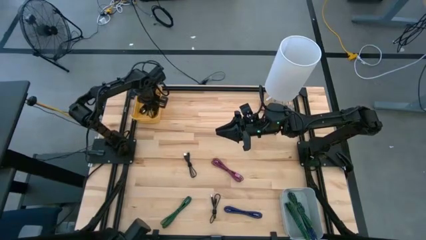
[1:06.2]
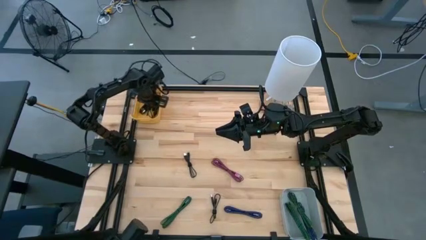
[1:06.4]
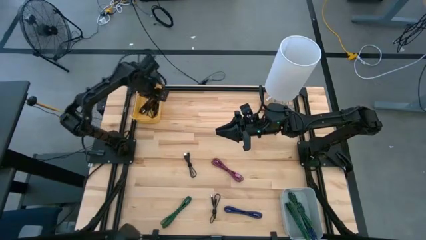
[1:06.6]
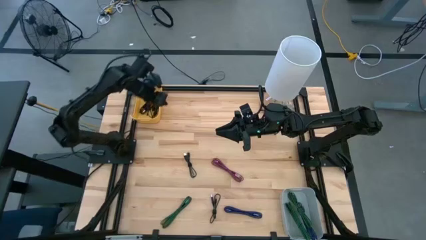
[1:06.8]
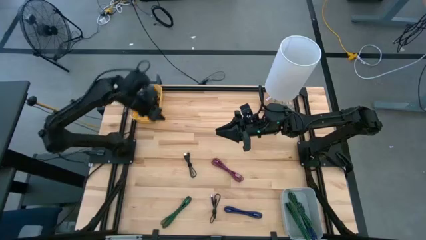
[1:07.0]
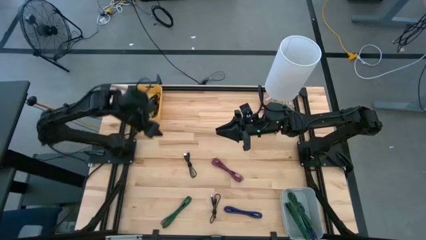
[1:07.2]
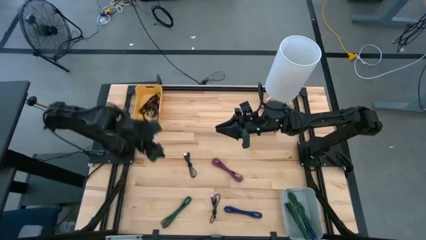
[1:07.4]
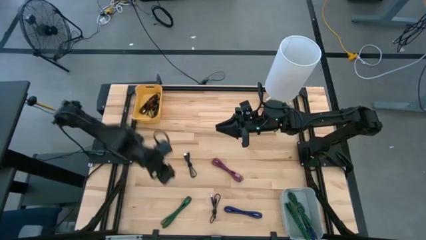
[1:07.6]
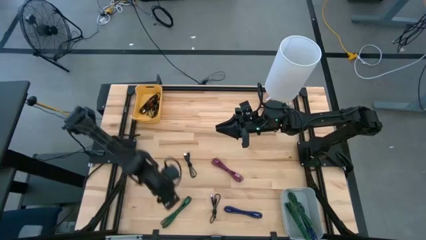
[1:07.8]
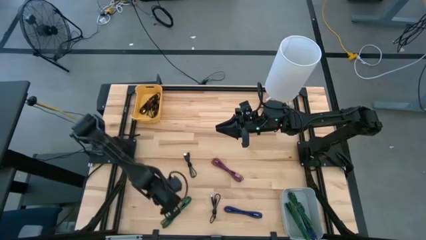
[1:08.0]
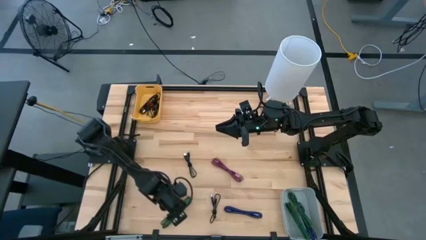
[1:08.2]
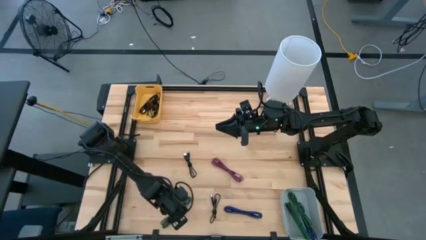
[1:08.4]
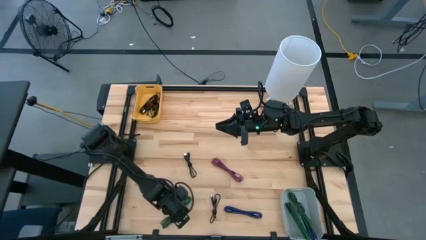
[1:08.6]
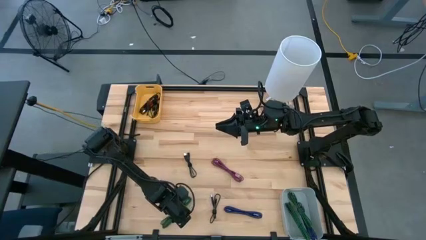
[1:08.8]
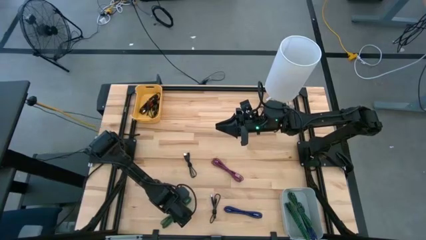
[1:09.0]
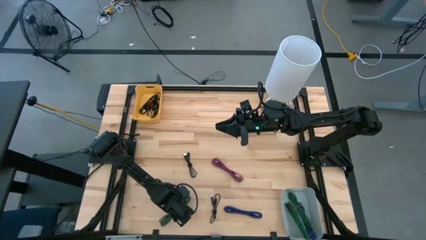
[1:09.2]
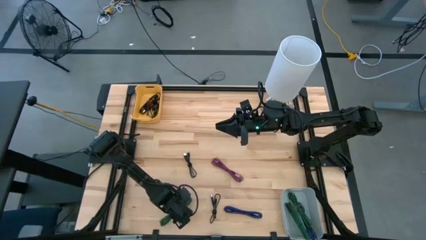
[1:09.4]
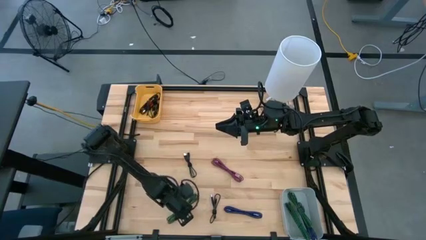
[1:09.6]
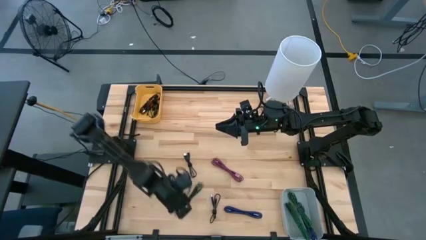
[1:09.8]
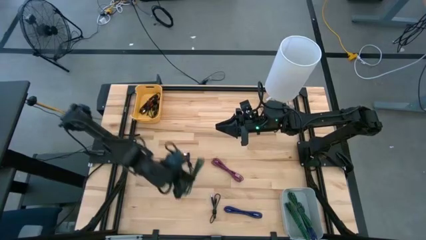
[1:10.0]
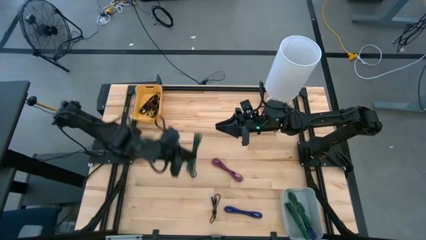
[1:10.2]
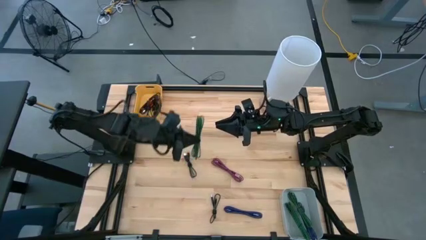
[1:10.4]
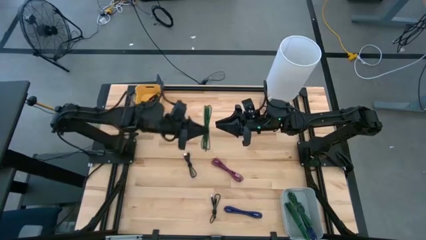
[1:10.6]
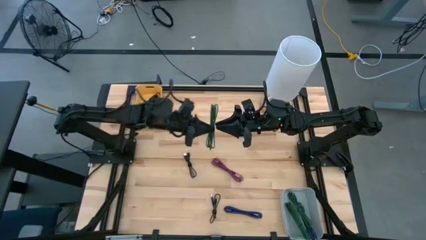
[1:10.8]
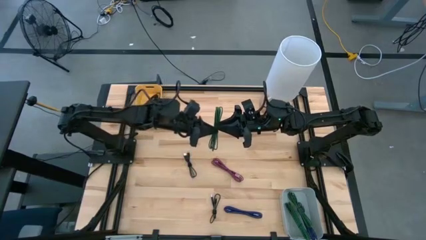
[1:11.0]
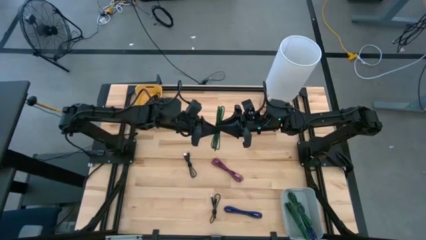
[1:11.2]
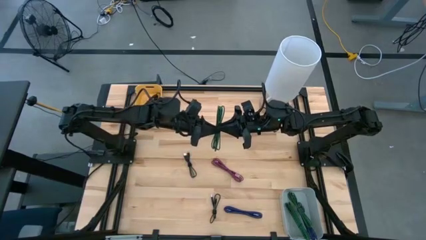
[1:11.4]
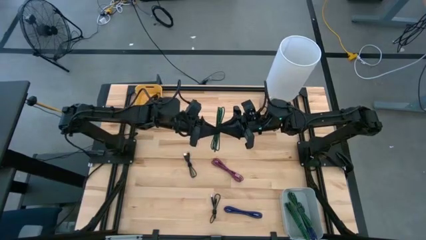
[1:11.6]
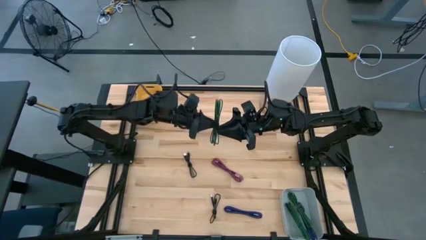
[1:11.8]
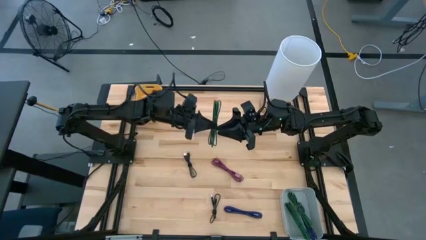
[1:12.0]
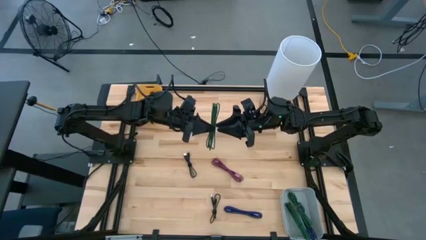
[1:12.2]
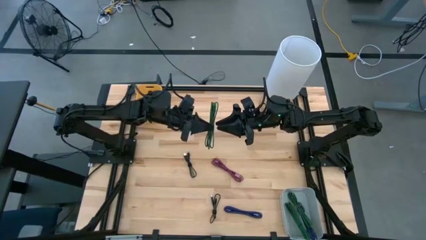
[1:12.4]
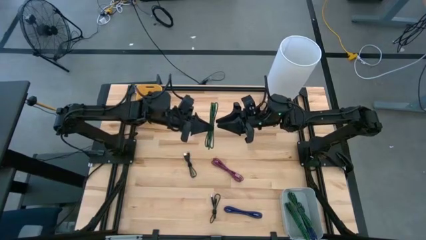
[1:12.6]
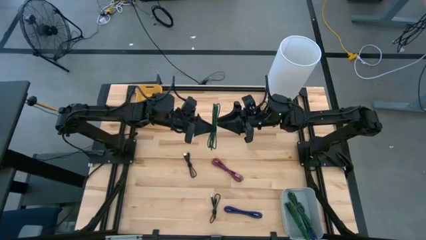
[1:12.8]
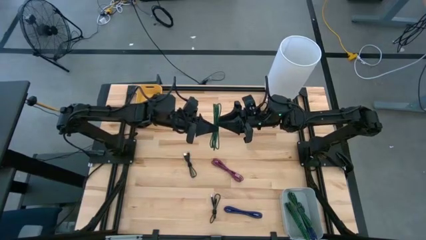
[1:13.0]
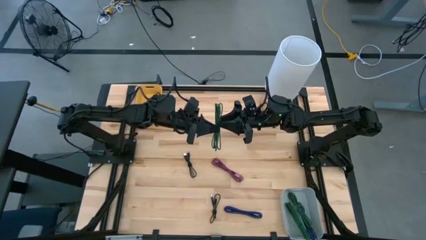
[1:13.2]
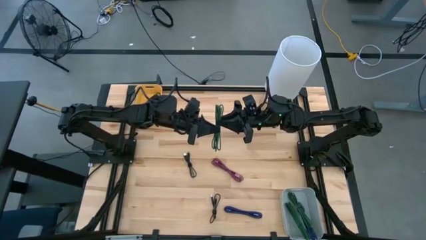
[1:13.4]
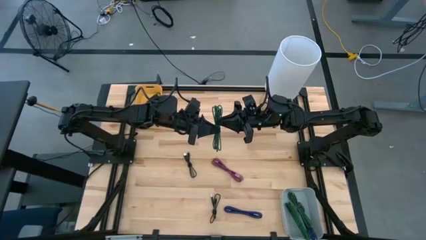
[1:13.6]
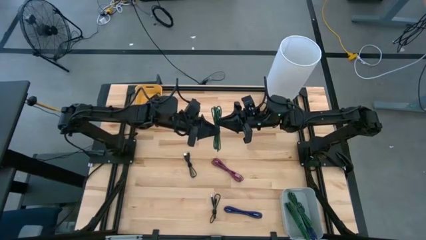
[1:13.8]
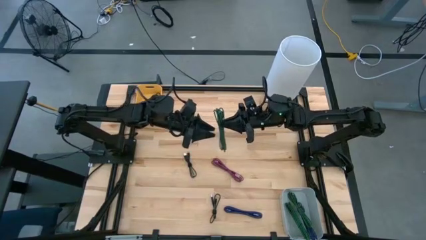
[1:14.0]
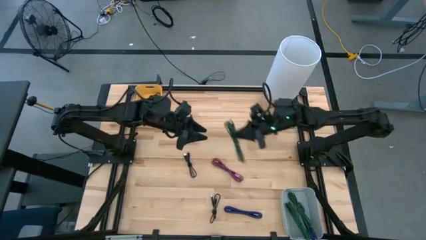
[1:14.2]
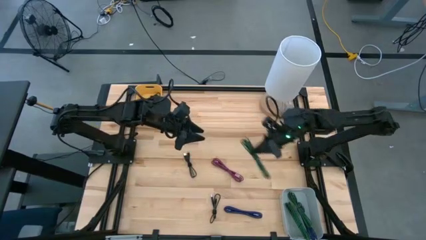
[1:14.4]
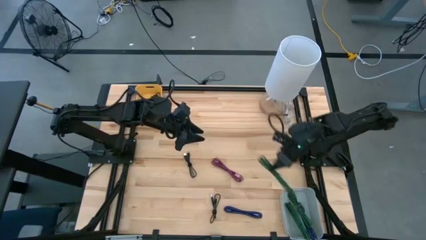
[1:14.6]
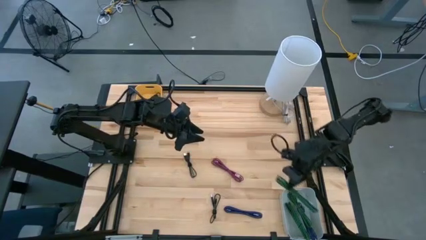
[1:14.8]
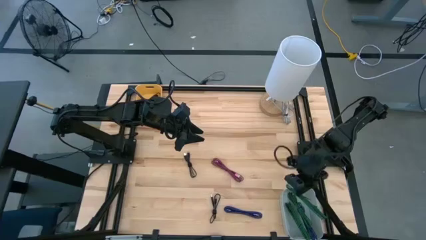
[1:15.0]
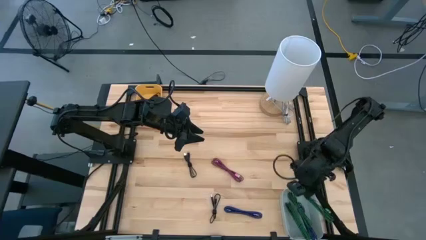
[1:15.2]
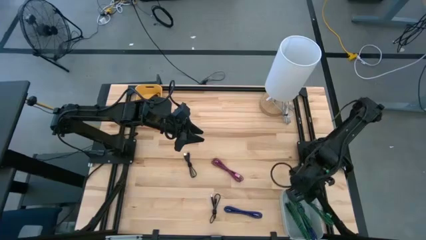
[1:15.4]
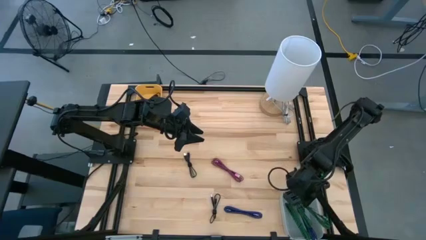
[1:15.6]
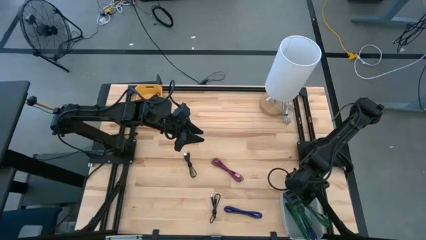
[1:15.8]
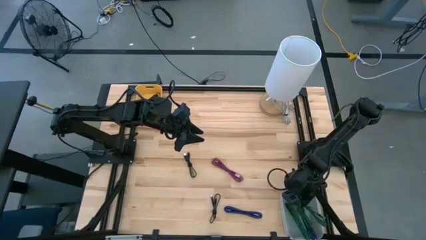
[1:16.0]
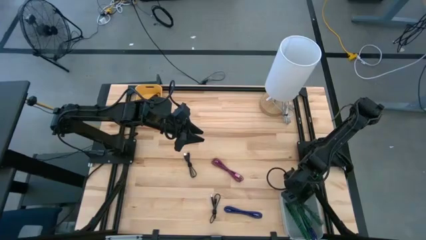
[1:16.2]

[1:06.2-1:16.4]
Task: Pick & Place USB Port
Put the green charger cable into the gray bin

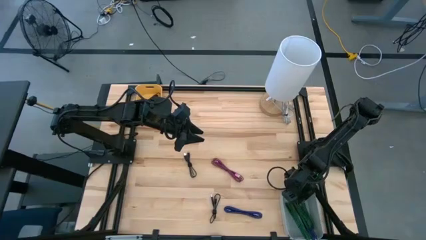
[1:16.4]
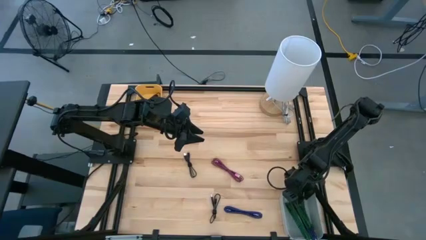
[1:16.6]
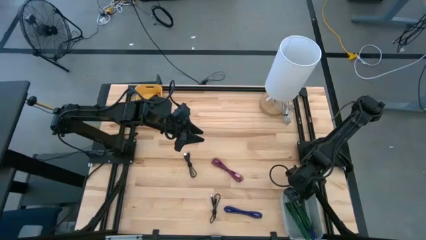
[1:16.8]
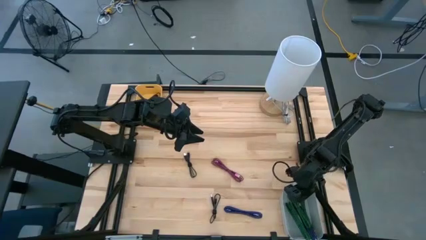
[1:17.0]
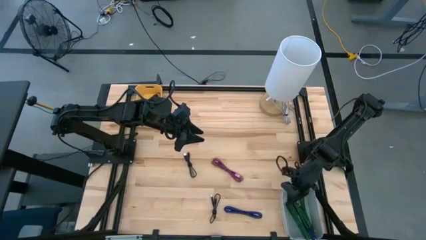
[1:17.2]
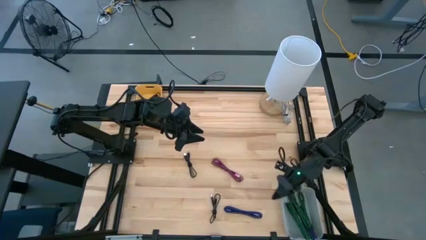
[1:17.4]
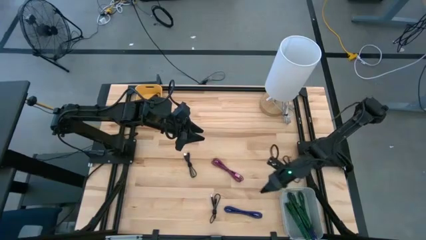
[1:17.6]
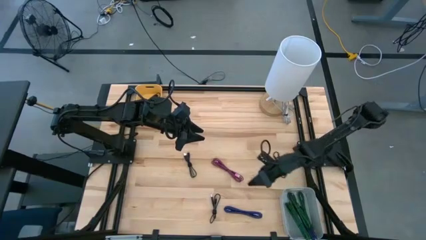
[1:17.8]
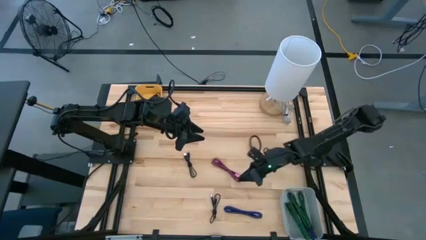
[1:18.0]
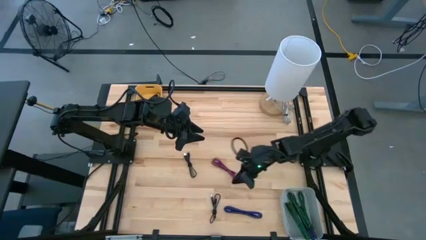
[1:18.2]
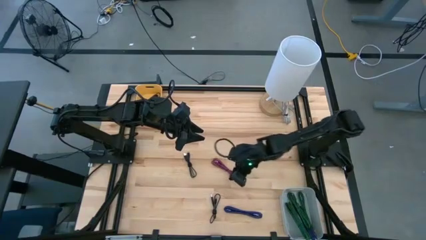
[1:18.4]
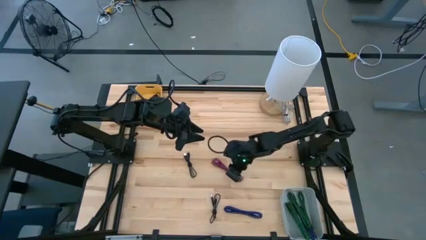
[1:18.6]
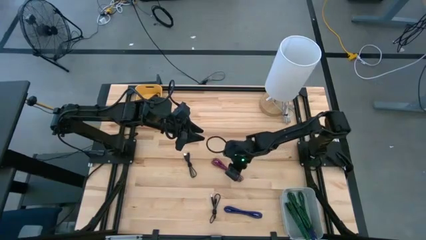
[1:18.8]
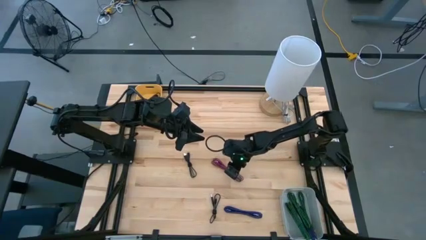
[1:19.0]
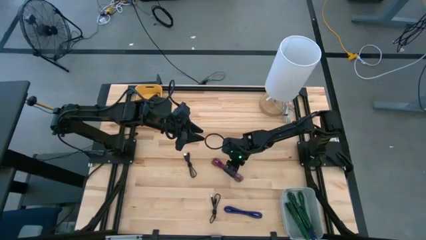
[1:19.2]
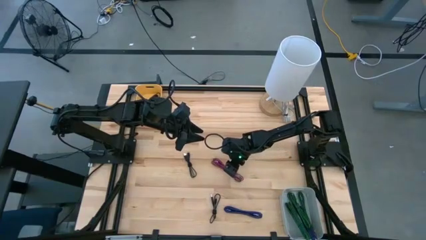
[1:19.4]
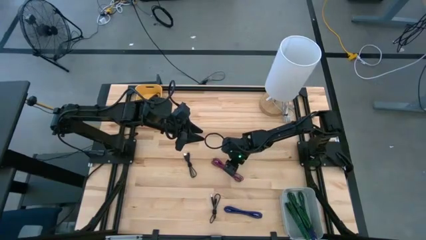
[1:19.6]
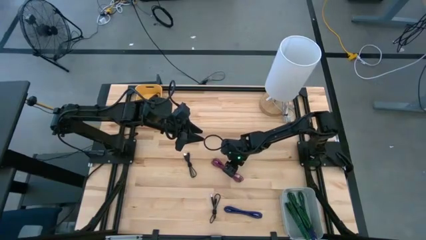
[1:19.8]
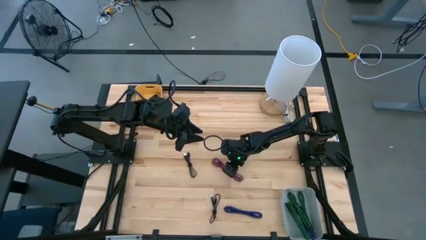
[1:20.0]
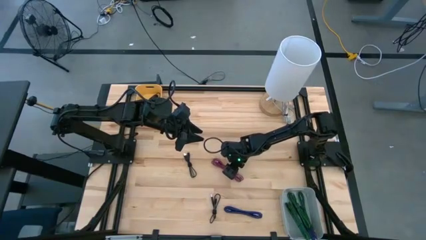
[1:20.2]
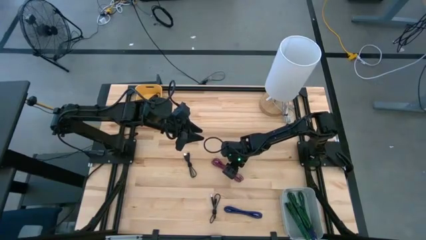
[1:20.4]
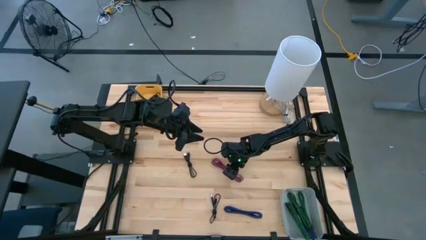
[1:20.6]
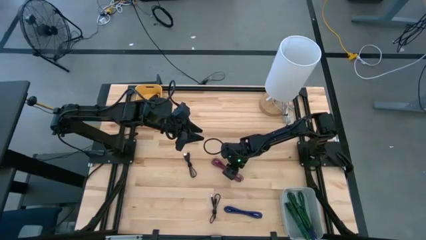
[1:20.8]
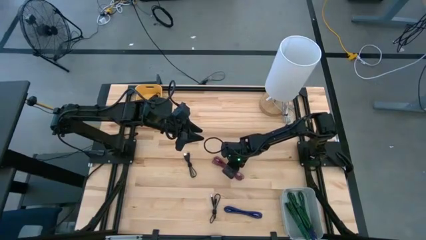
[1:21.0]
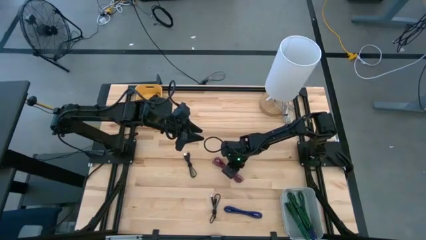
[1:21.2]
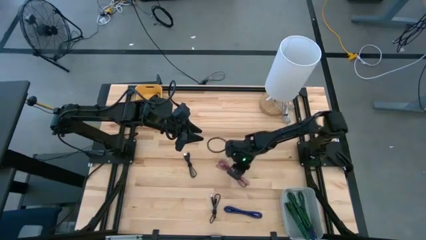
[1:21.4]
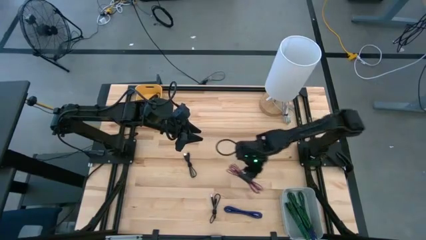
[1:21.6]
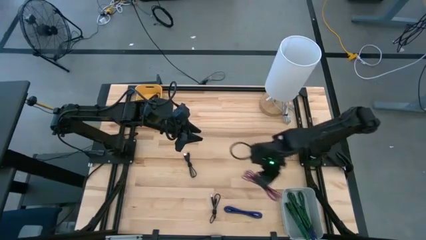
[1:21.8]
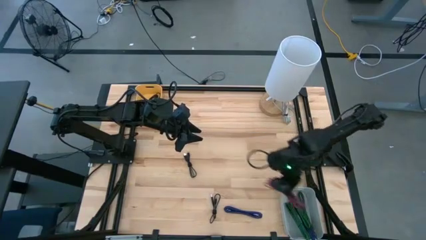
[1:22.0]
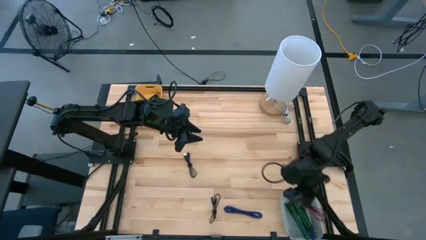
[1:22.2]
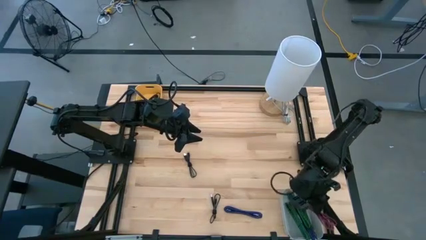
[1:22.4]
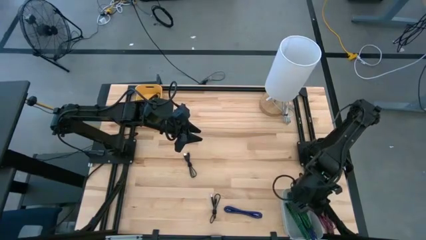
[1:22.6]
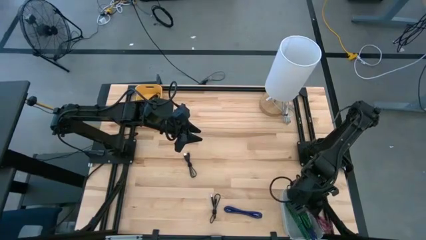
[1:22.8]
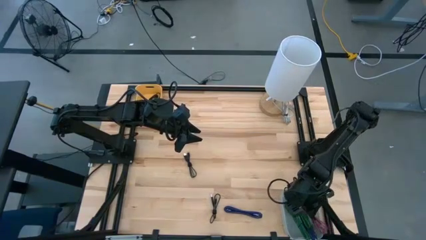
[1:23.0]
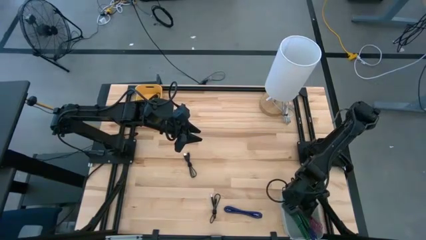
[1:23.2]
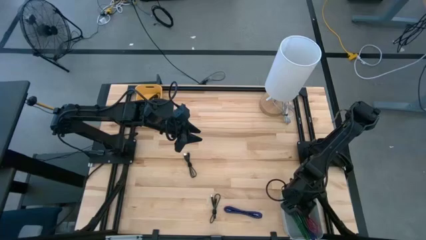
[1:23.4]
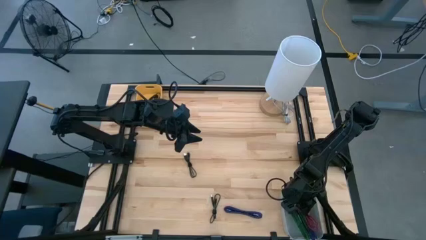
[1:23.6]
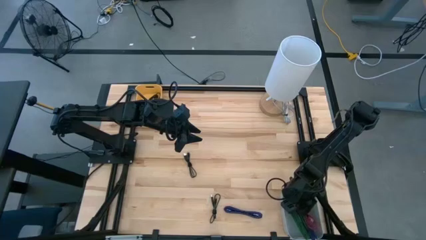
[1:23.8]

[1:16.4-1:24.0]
Put the pink charger cable into the gray bin
